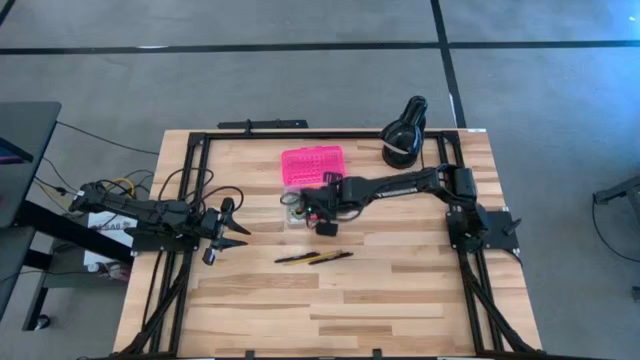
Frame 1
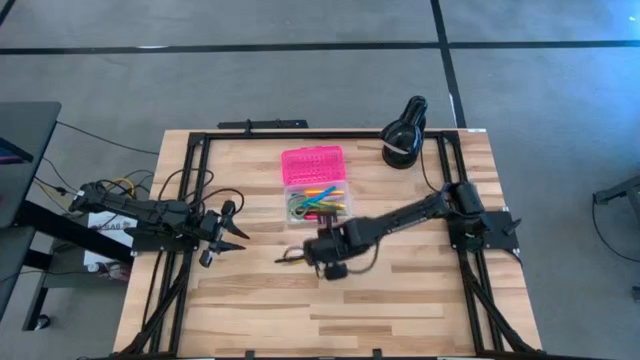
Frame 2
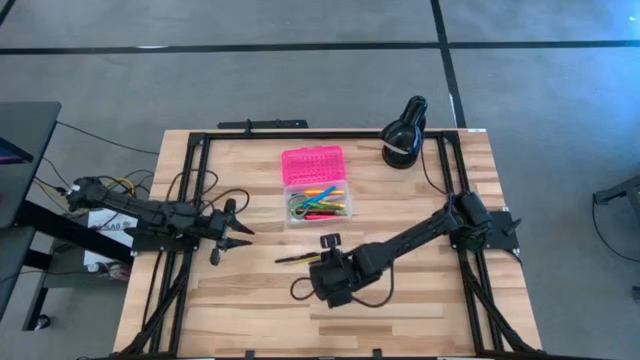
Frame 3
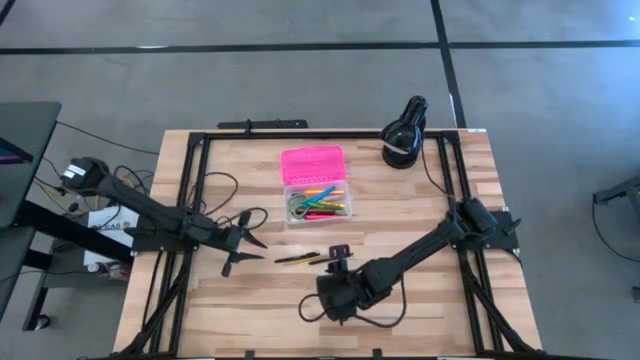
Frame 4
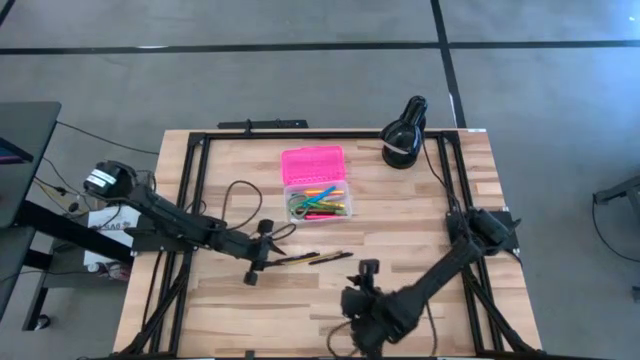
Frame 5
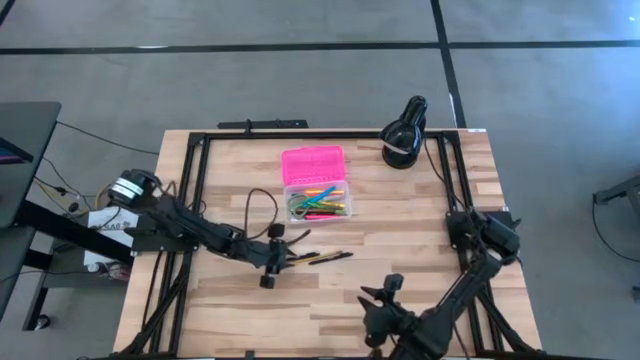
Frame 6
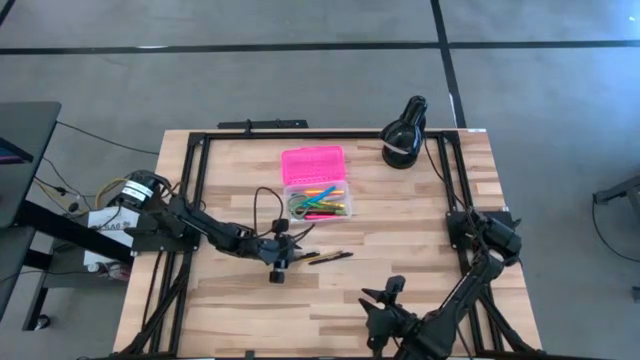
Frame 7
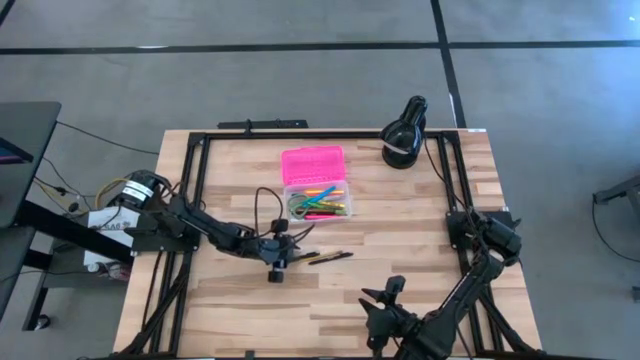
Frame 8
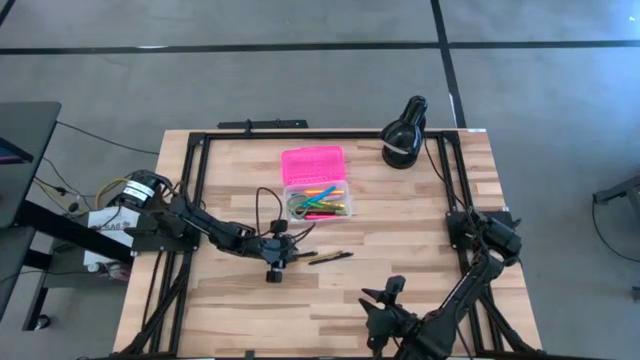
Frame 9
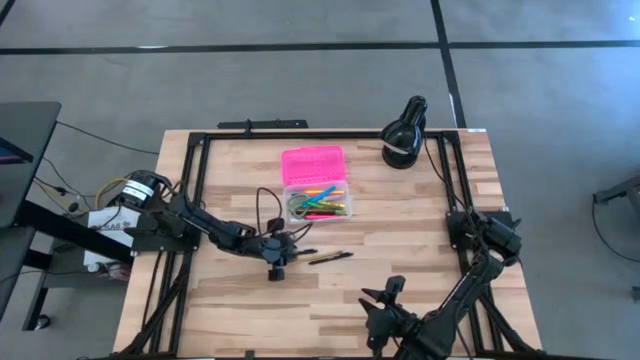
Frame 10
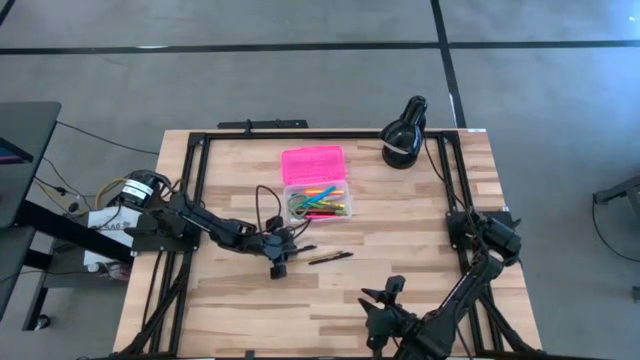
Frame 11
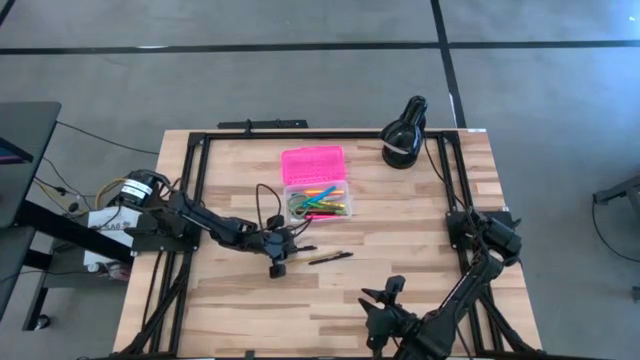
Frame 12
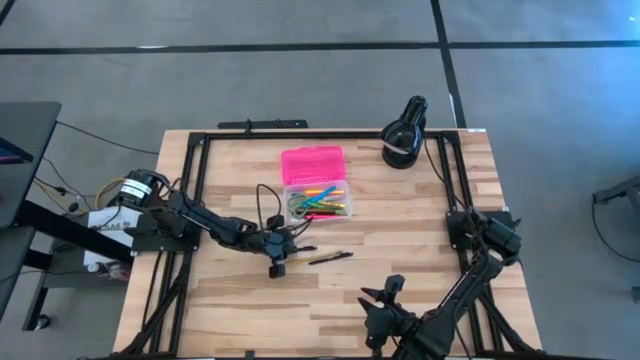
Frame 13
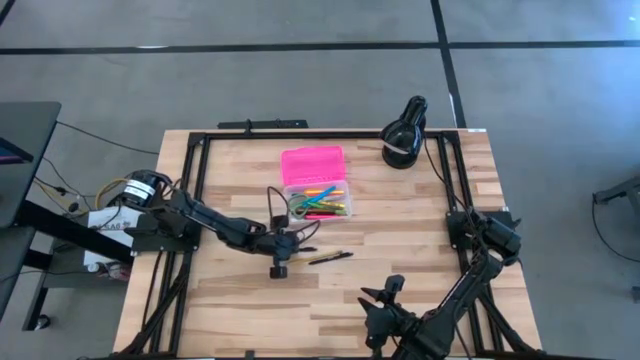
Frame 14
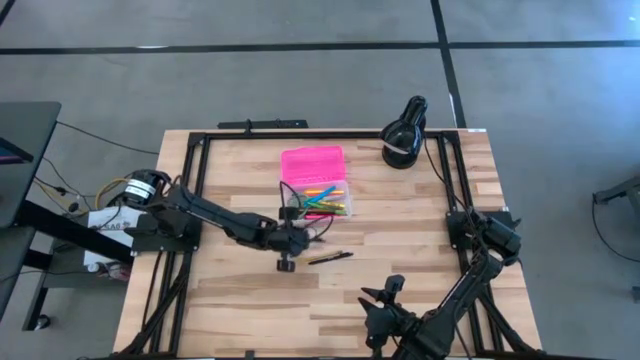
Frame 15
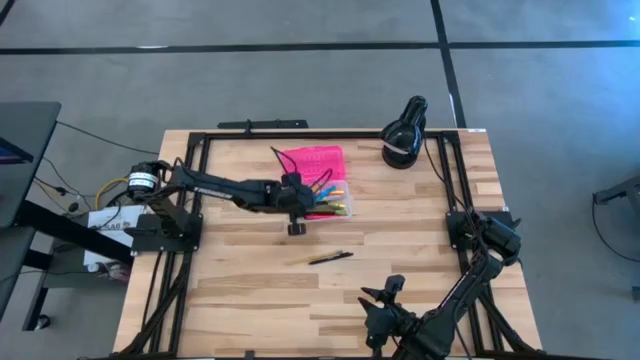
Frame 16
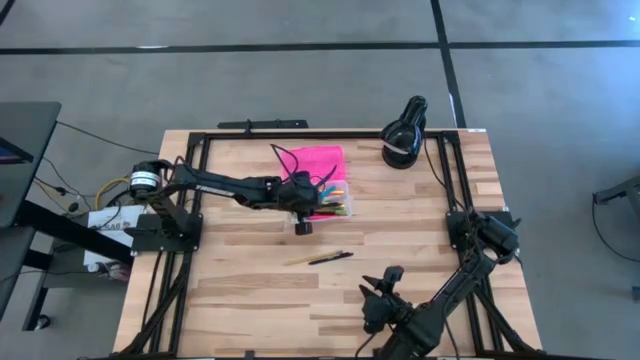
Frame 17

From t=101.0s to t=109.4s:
Task: Pick & place school supplies into a supply box
Put the left black pen into the supply box

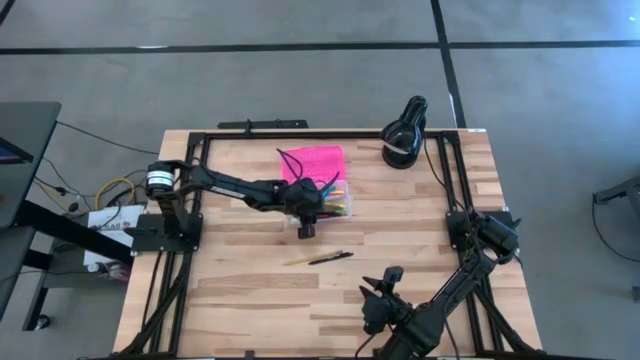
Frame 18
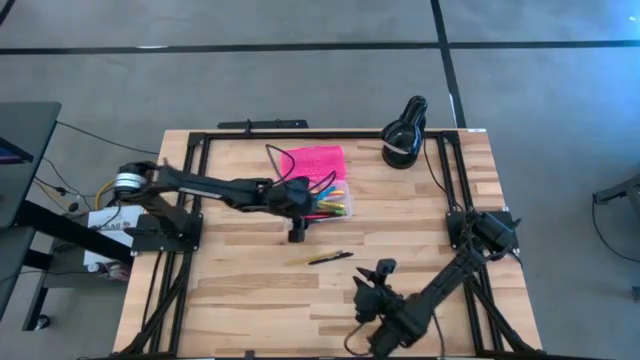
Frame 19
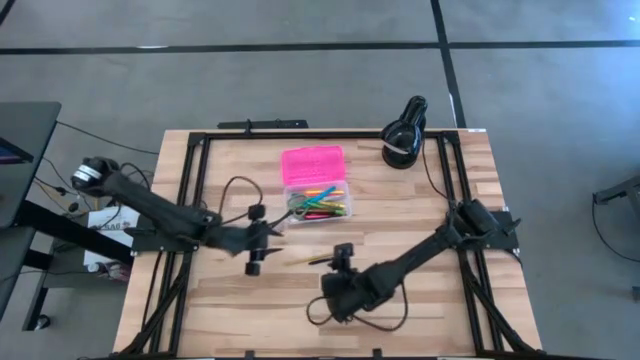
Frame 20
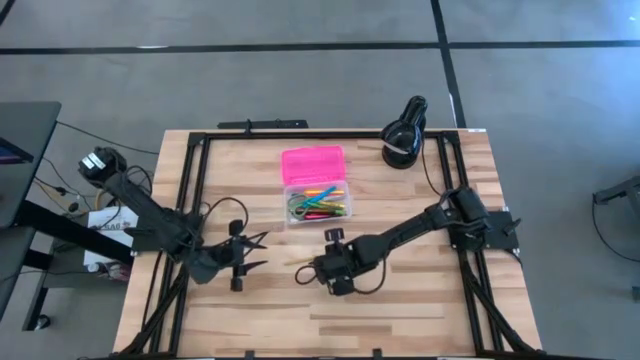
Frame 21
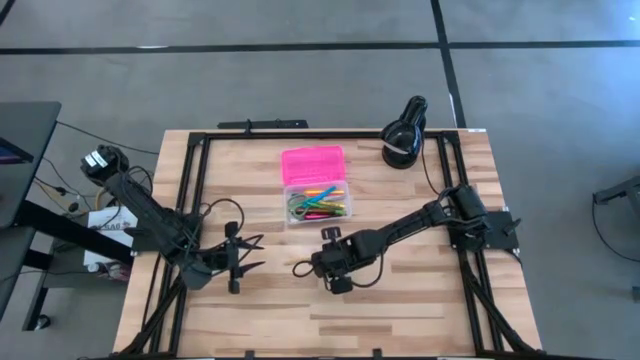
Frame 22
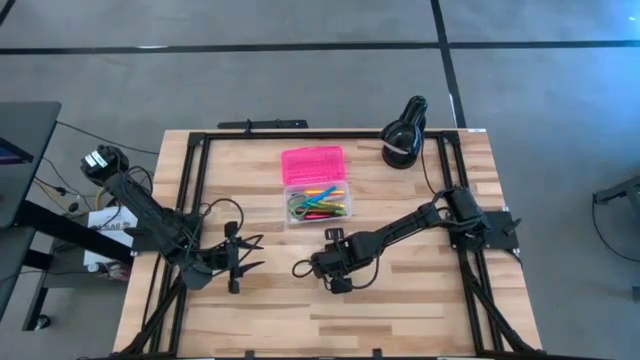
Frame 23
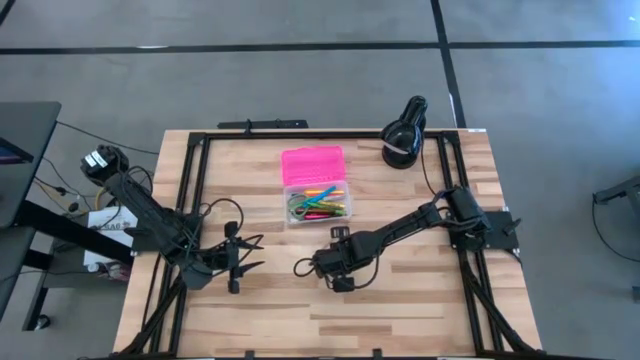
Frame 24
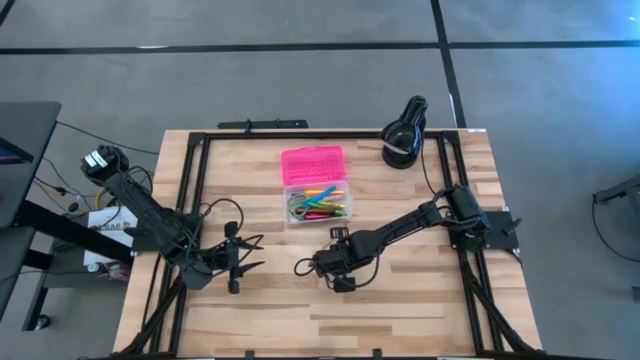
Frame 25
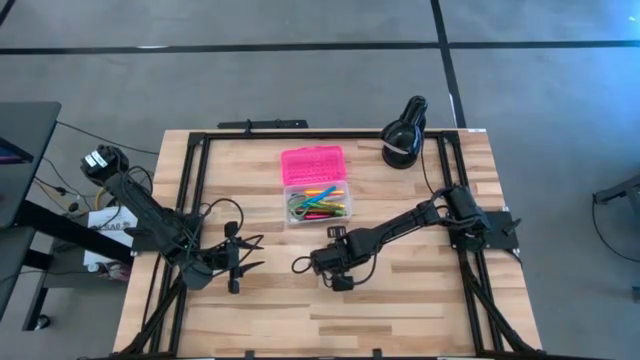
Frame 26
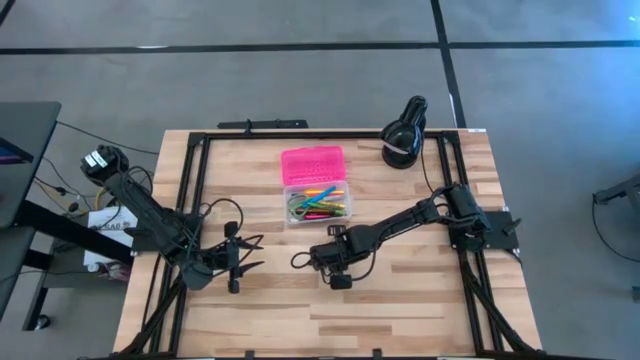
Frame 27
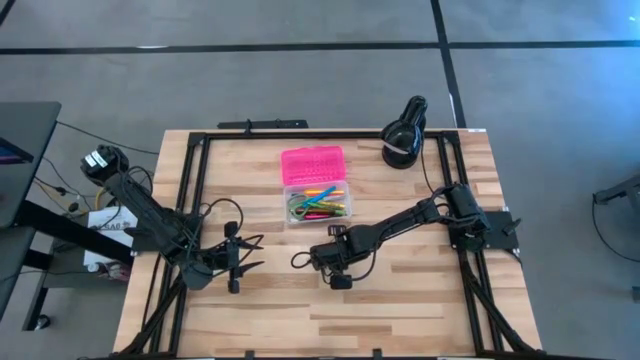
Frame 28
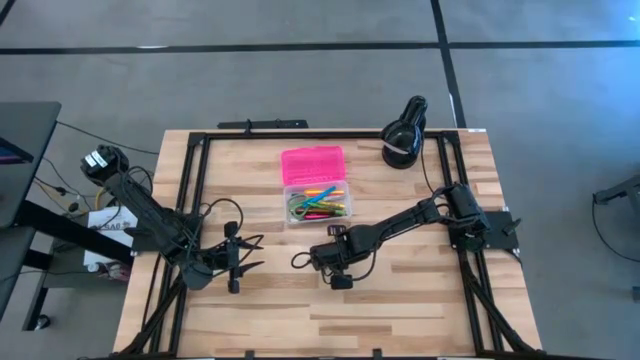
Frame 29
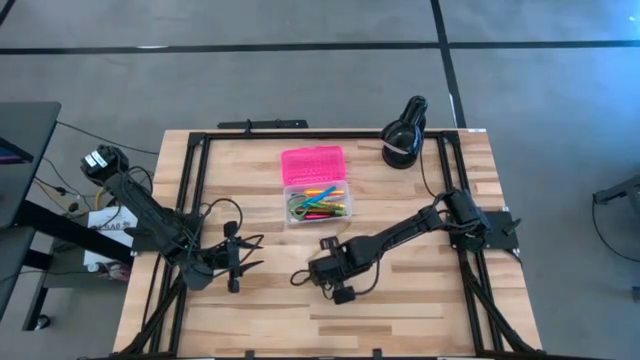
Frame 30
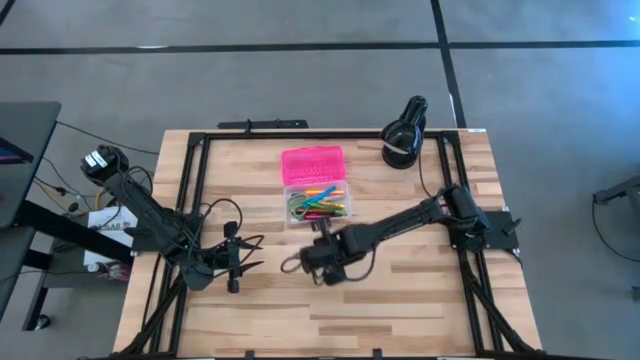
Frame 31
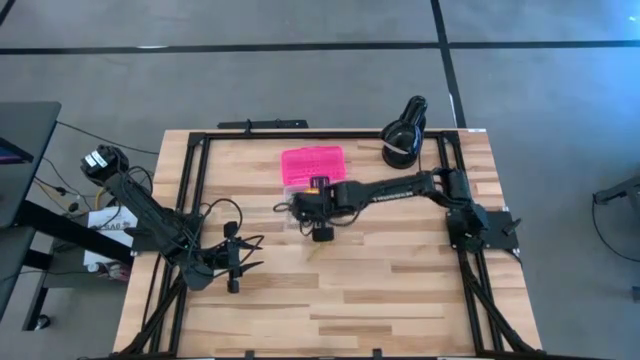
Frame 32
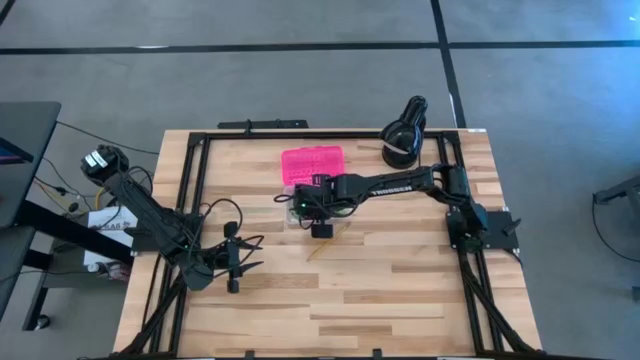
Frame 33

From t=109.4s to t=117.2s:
Put the black pen into the supply box

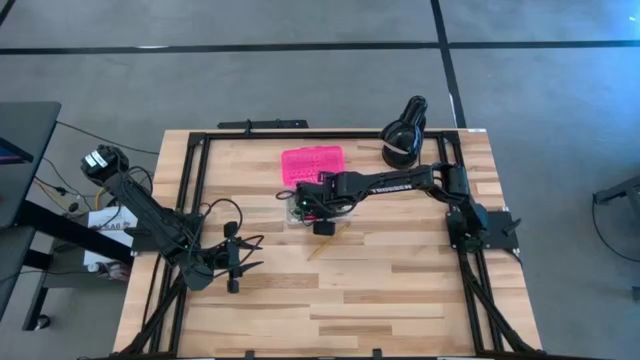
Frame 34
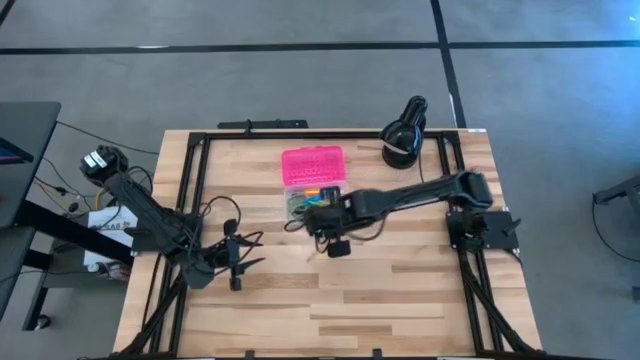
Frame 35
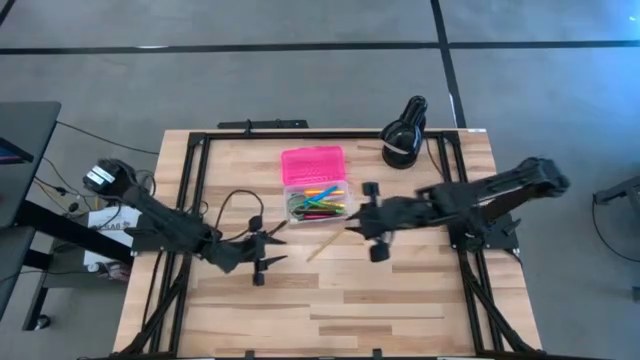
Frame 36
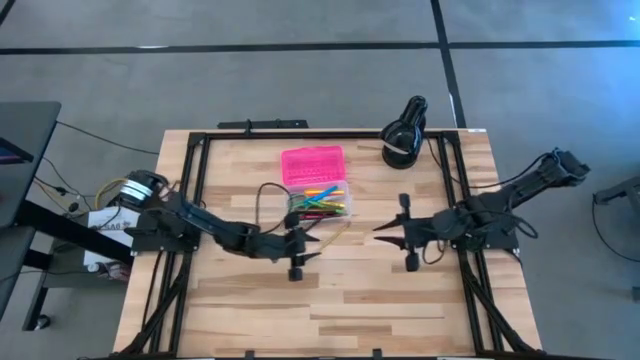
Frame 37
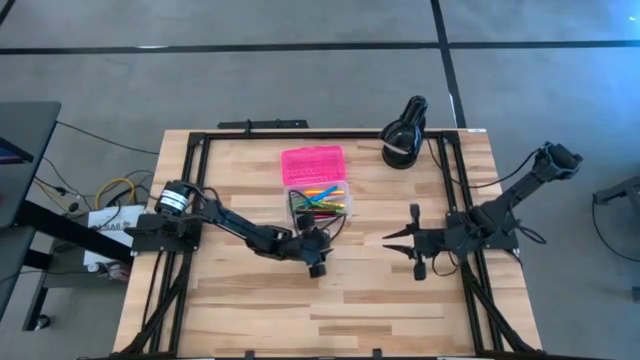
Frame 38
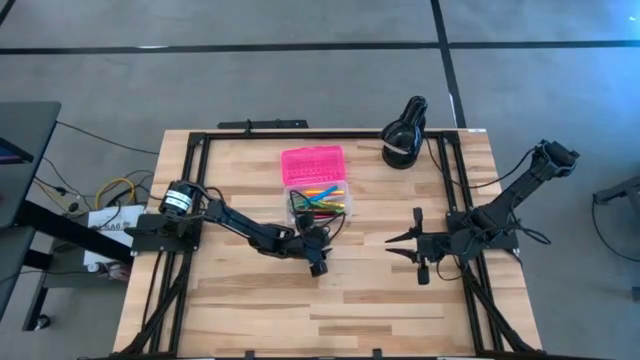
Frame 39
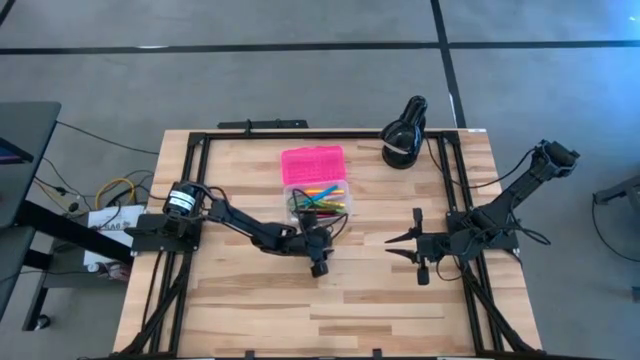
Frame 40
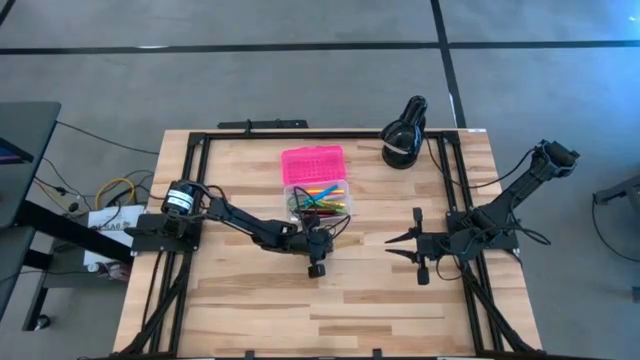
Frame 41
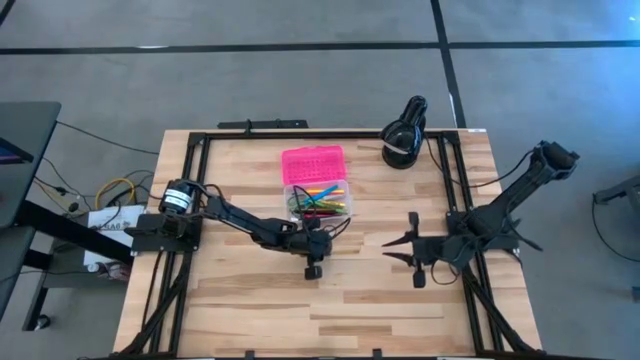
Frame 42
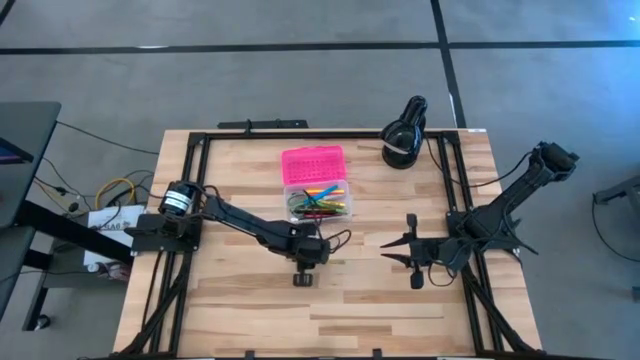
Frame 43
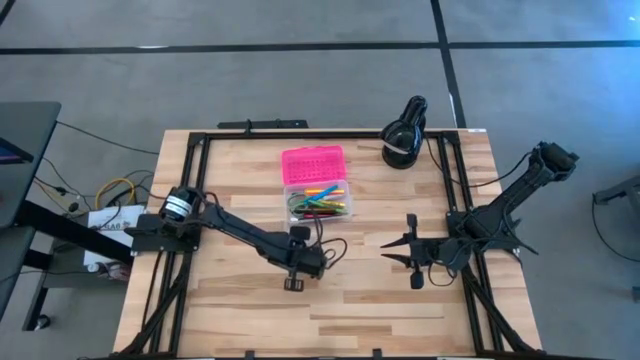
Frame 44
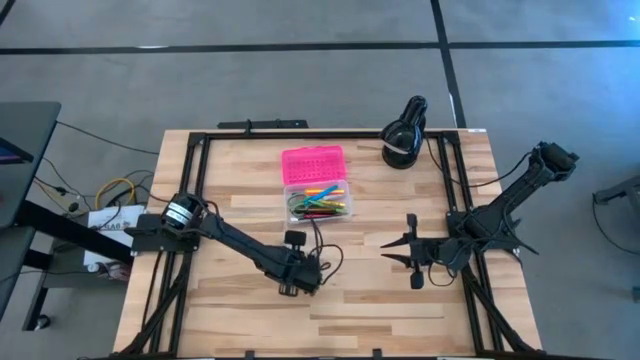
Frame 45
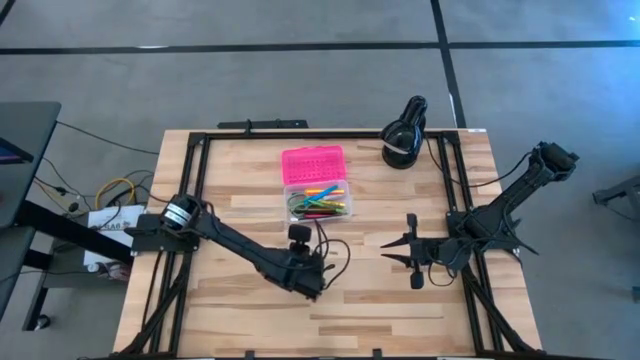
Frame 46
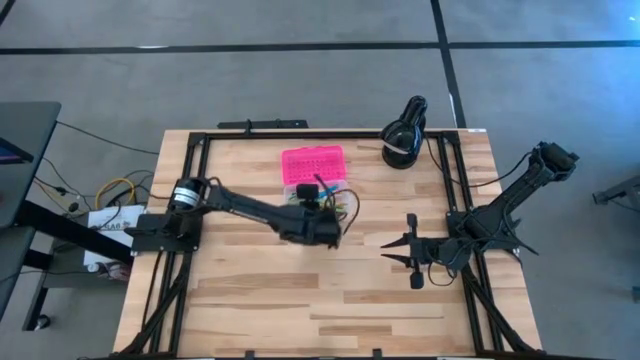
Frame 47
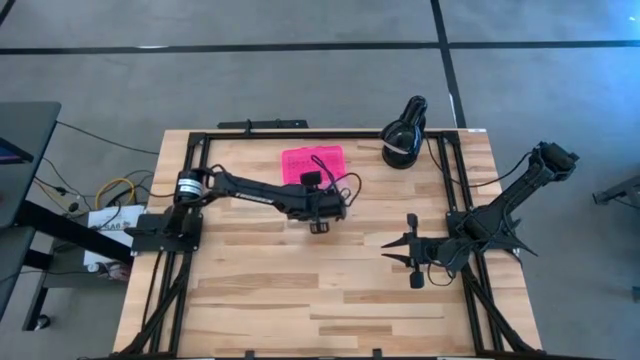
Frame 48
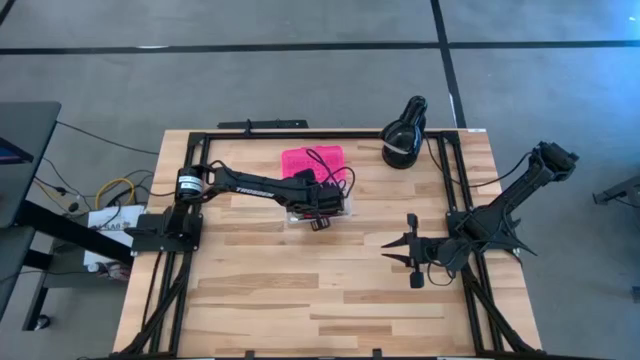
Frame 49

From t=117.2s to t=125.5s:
Put the yellow pencil into the supply box
